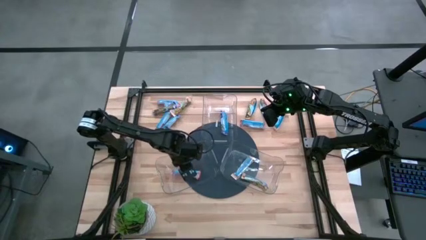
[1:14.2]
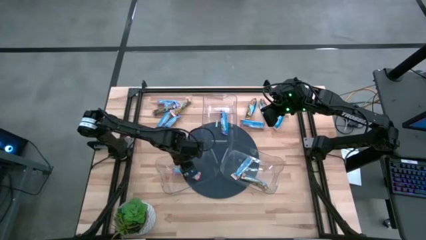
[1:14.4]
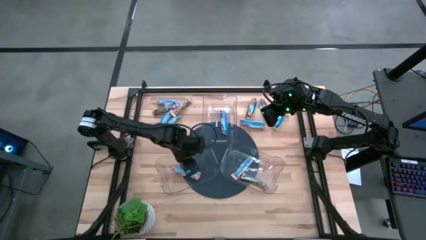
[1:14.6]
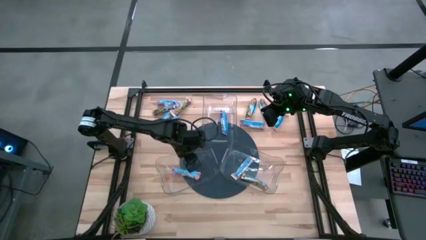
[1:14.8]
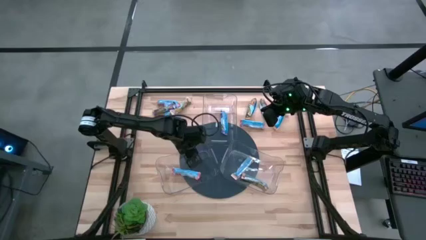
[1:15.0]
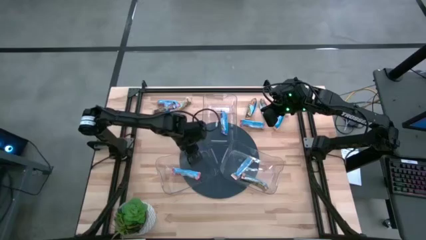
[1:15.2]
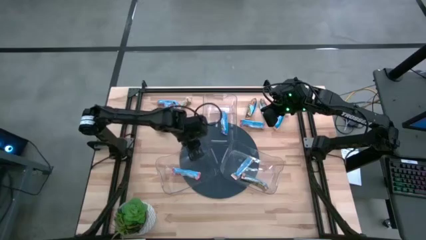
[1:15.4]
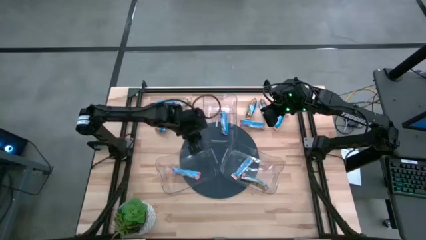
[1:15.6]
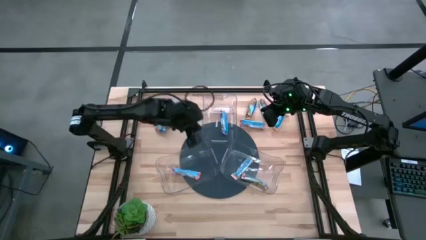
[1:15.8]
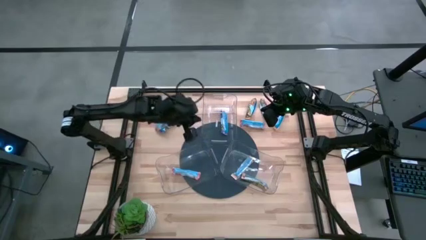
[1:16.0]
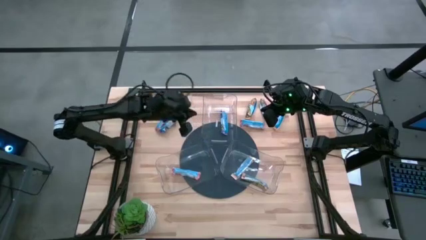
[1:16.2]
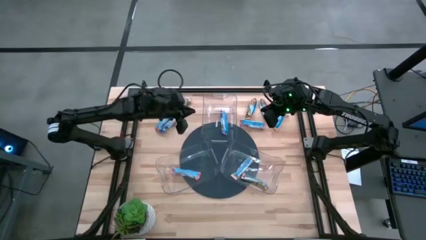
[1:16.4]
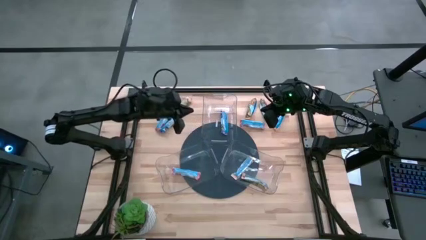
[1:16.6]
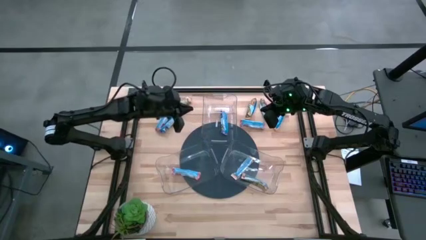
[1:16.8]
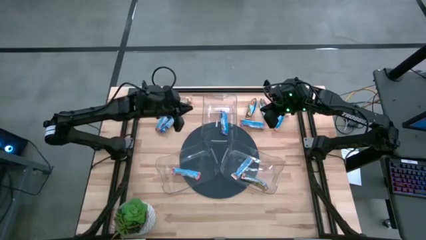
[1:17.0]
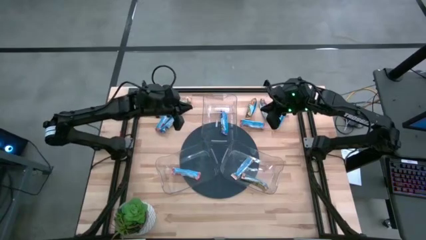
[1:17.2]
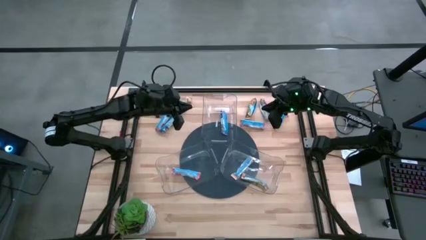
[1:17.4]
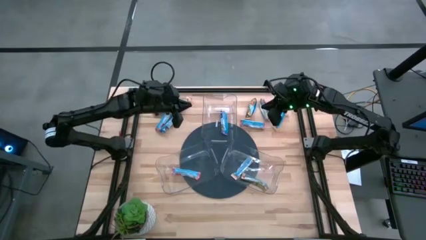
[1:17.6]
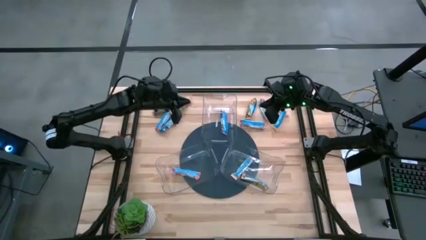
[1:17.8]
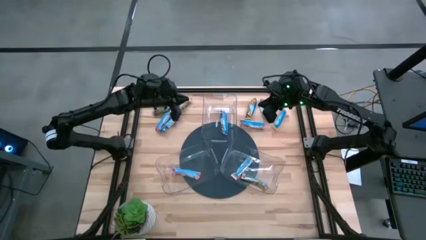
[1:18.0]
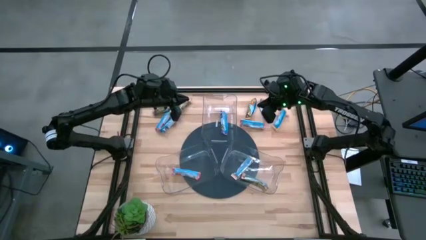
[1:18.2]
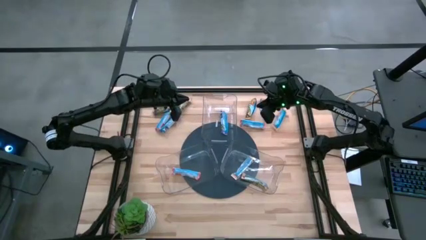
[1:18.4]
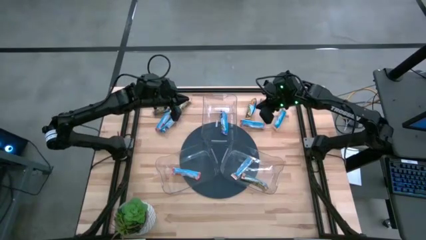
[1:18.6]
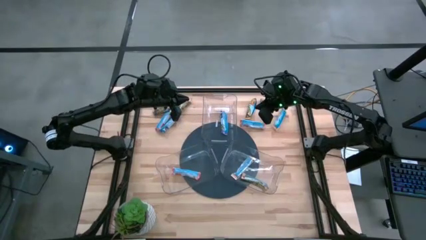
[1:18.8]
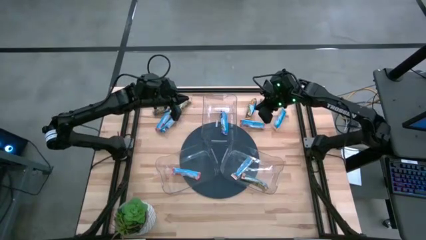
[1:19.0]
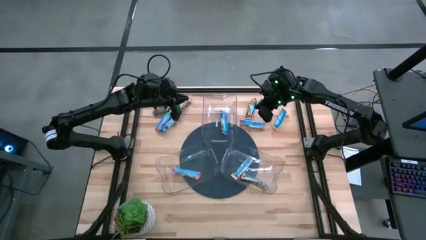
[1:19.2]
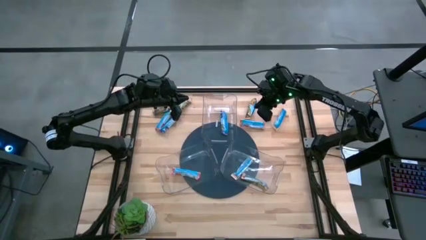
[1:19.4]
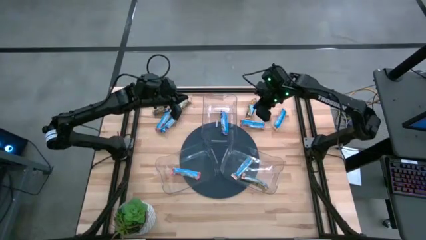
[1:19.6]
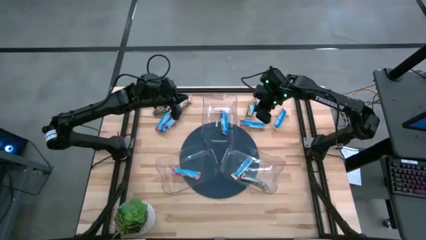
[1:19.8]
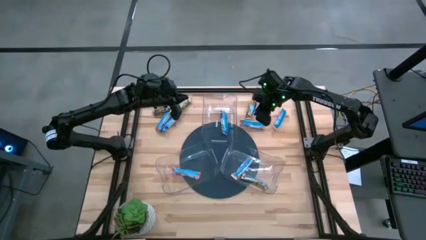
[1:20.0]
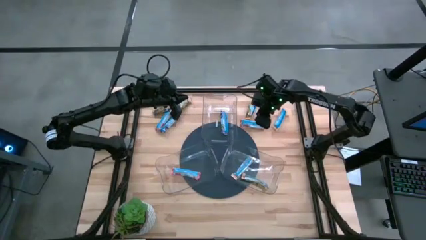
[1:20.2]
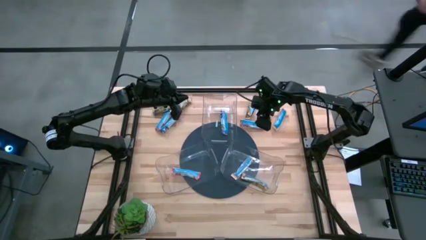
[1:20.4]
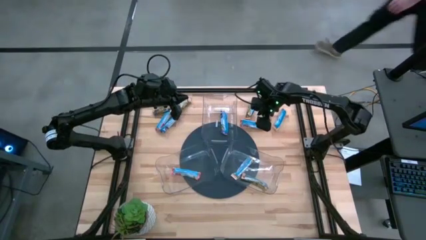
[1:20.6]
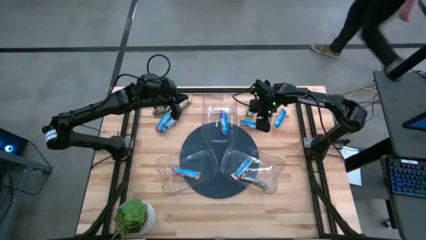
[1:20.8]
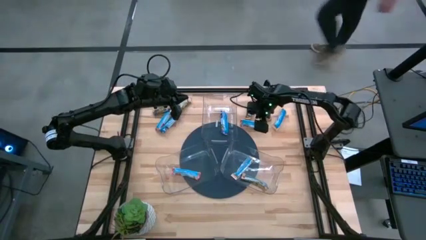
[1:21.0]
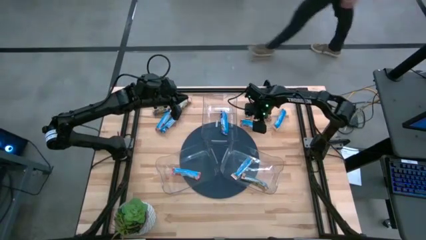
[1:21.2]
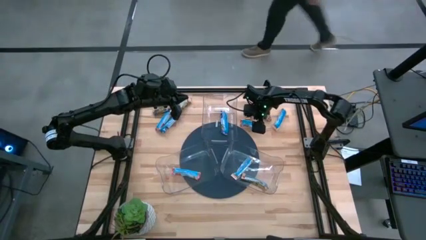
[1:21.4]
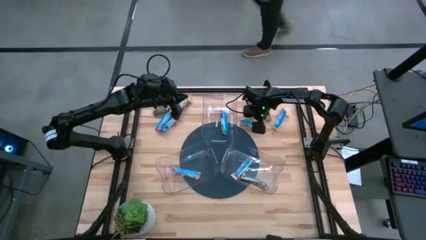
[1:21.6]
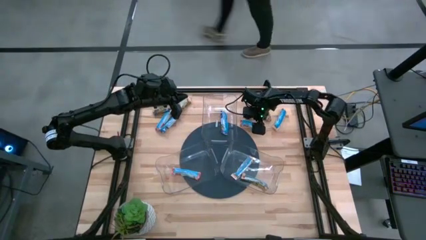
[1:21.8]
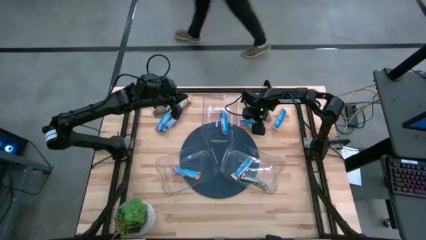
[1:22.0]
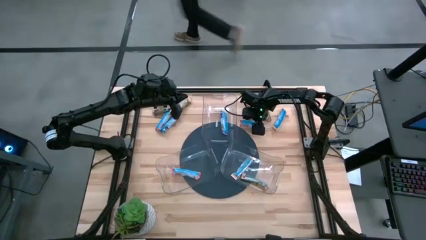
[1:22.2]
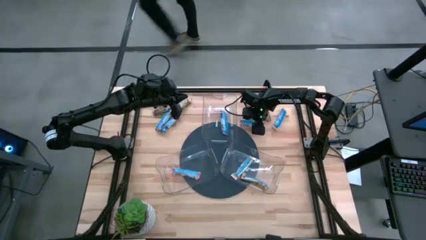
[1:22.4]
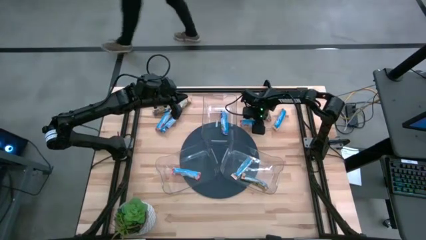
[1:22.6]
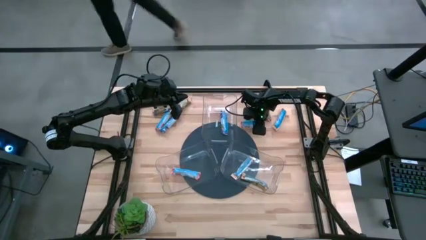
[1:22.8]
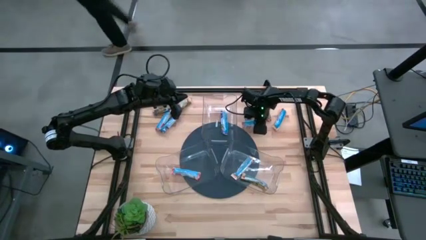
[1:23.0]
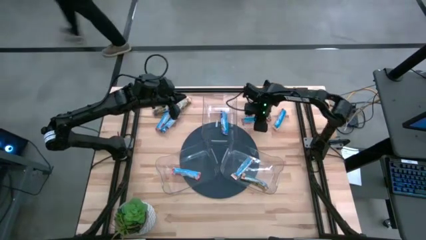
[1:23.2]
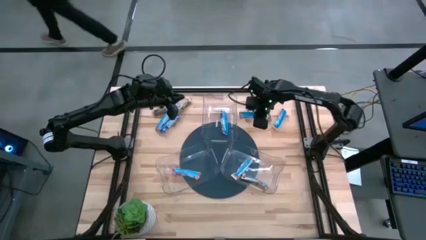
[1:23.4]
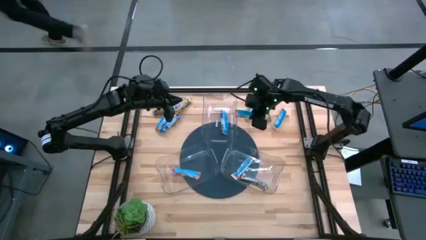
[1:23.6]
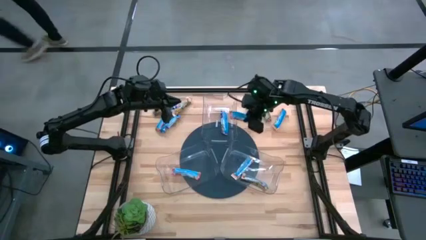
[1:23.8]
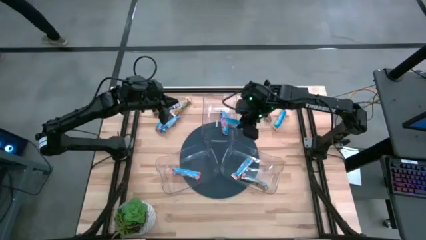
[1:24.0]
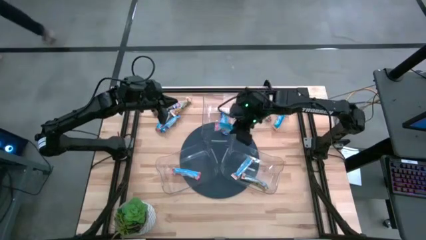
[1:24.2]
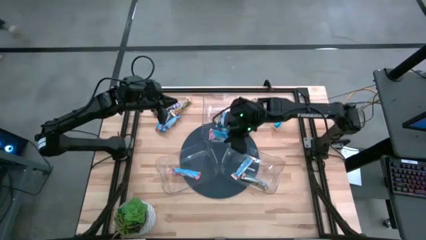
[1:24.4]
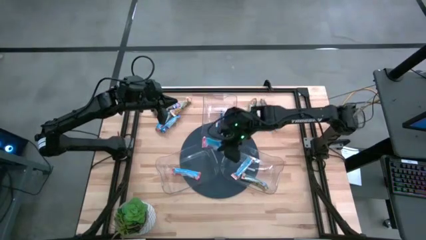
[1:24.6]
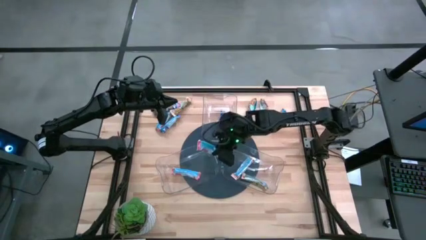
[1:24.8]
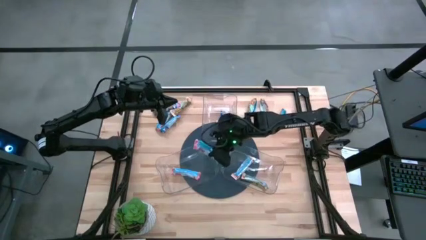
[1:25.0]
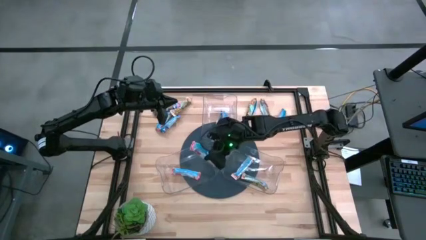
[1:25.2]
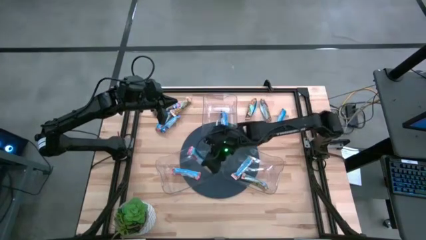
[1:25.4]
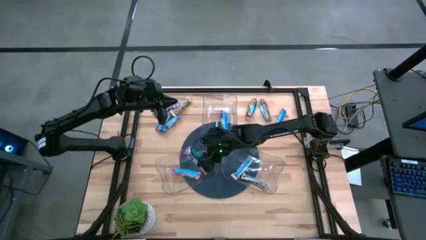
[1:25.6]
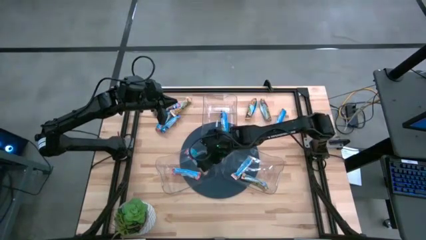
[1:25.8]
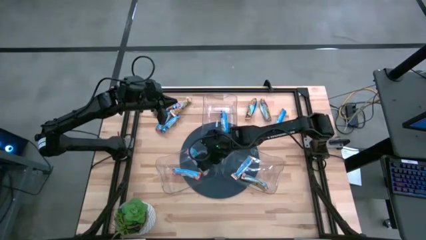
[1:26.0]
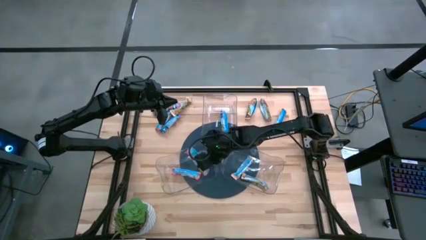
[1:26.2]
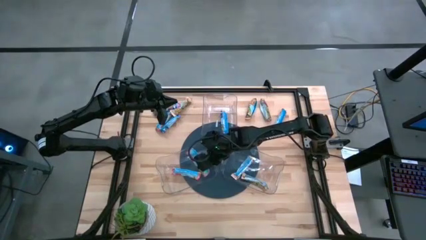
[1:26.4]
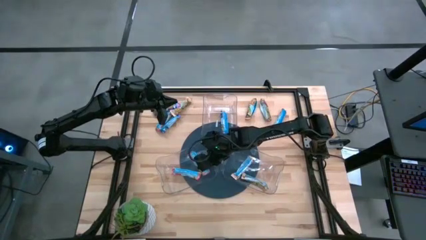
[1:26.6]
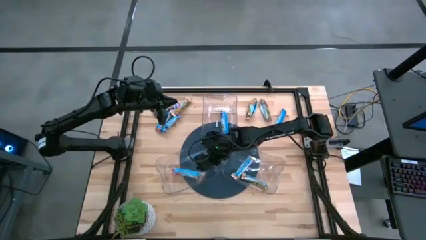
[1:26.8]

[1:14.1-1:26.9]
Task: Pick and place Granola Bars by type
Put the red granola bar into the left transparent bin

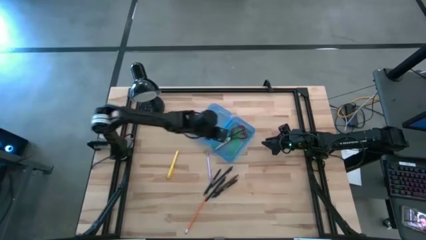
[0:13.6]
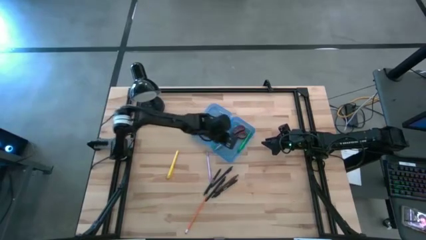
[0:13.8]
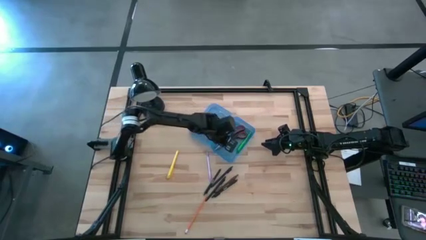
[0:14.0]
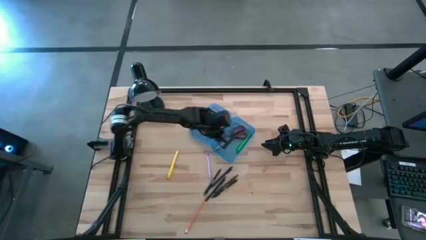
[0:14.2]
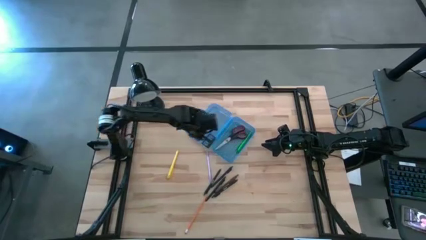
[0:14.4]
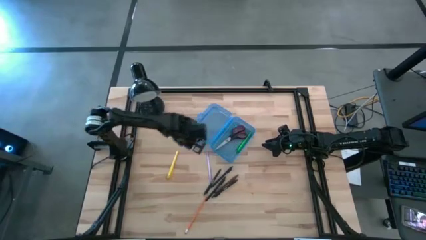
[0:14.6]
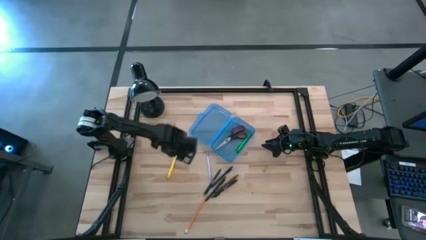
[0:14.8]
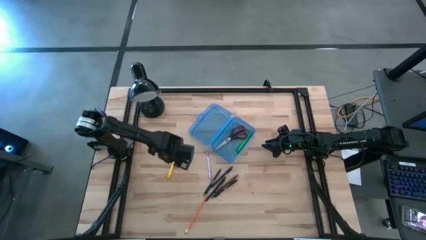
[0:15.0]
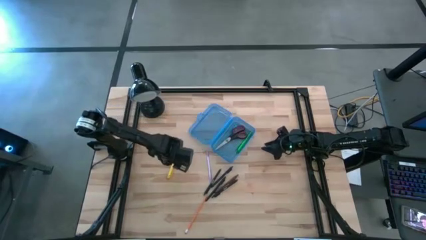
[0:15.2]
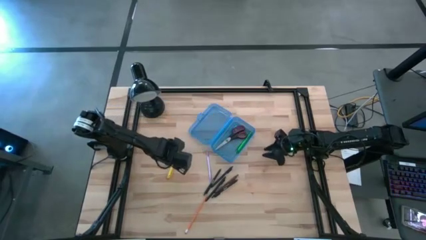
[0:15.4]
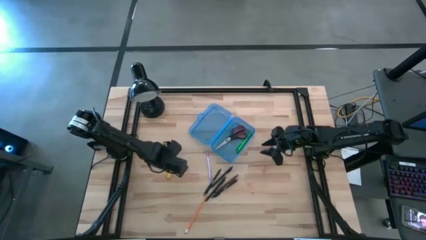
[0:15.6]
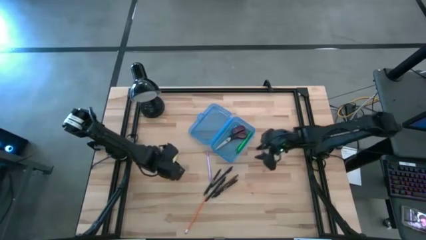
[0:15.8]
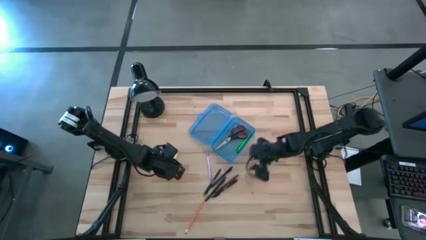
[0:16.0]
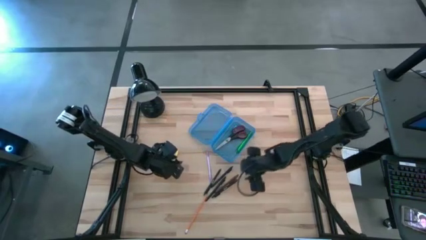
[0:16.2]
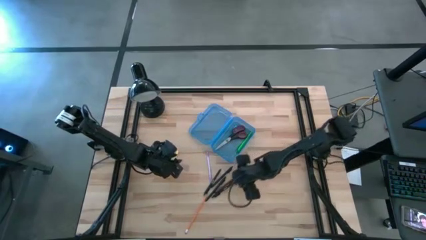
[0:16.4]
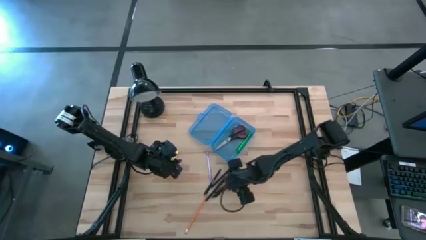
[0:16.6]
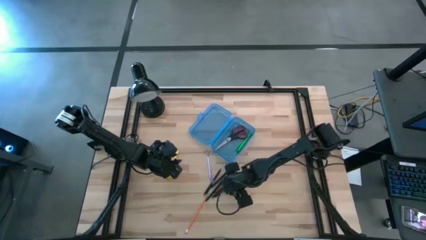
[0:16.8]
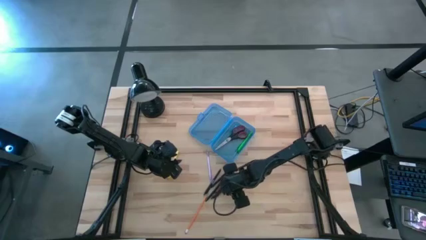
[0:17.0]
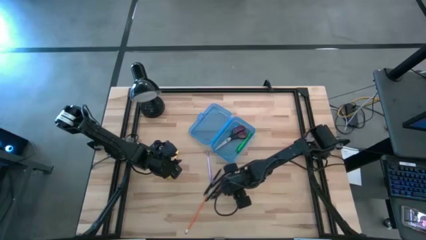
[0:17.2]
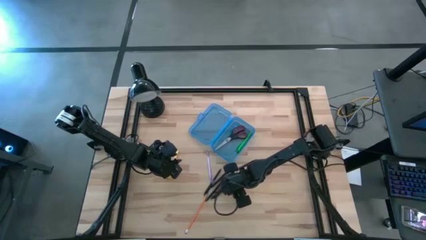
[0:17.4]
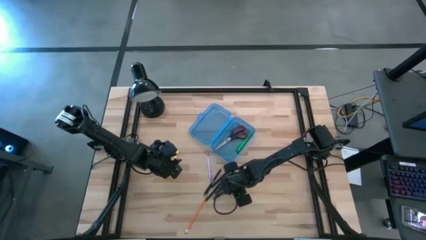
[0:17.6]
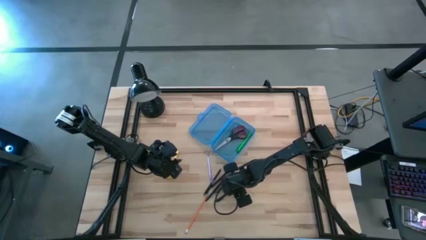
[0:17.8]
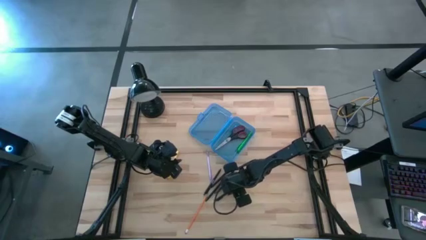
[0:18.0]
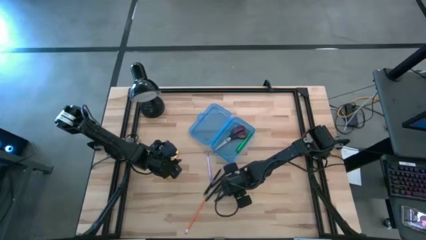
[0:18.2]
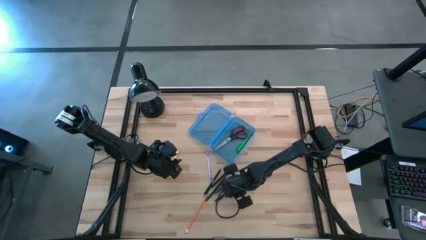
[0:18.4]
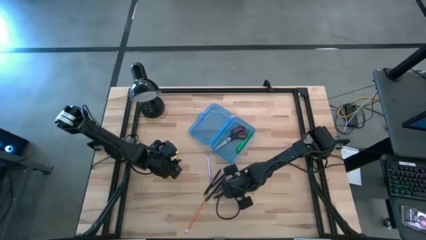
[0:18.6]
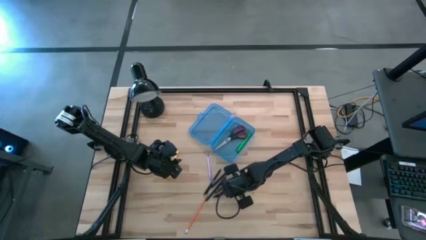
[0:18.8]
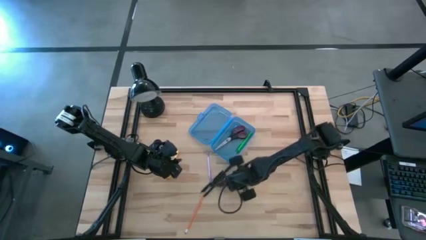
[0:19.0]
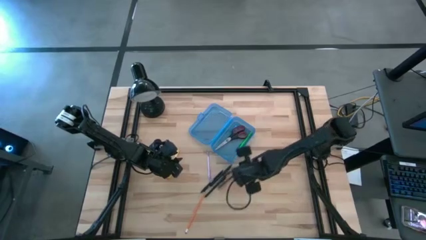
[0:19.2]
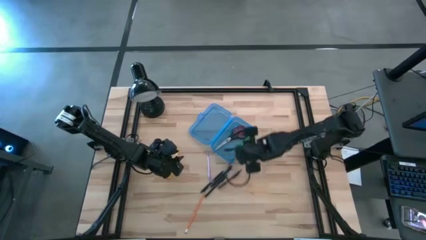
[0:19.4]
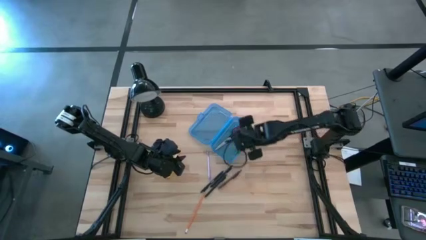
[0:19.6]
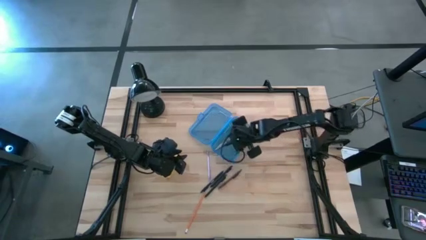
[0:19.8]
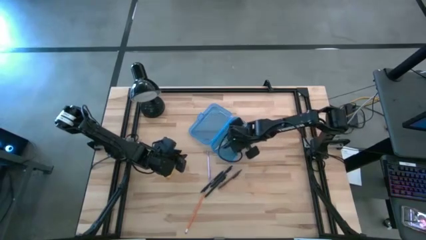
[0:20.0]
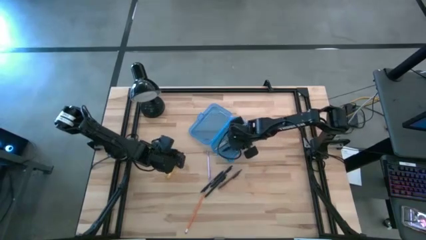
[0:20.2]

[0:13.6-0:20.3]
Task: Pick & place school supplies into a supply box
Put the black pen into the supply box
